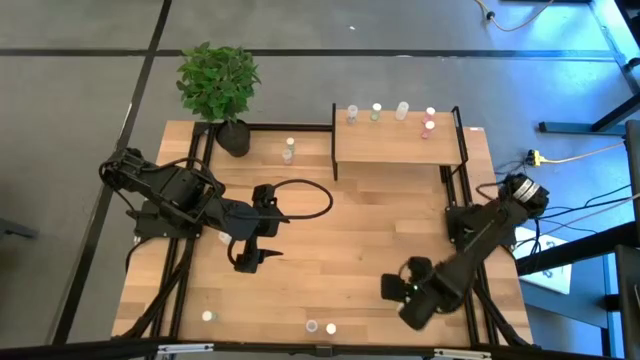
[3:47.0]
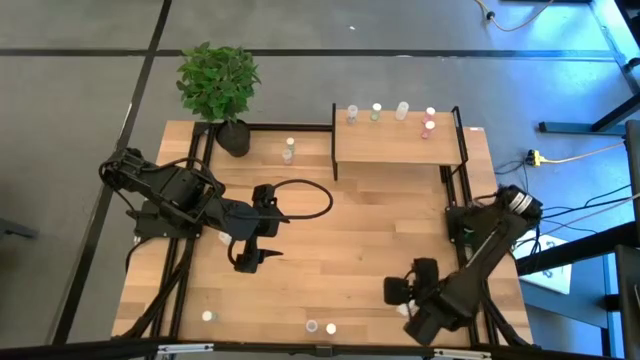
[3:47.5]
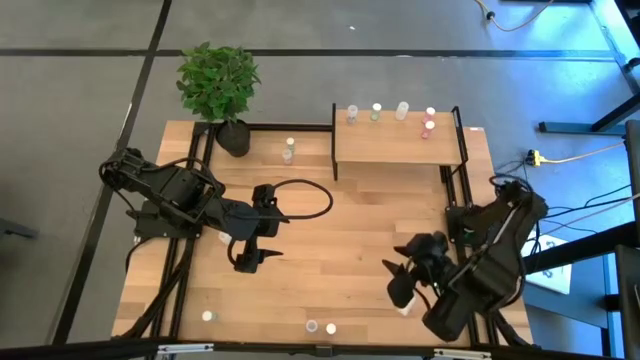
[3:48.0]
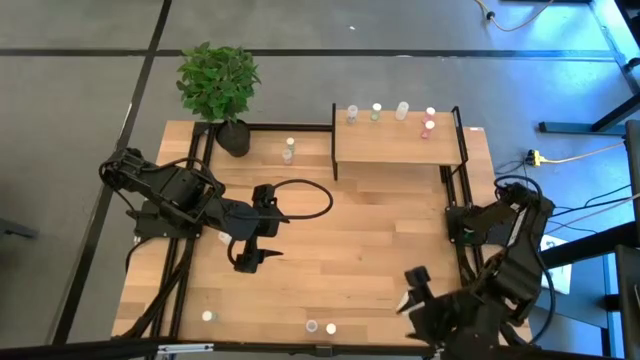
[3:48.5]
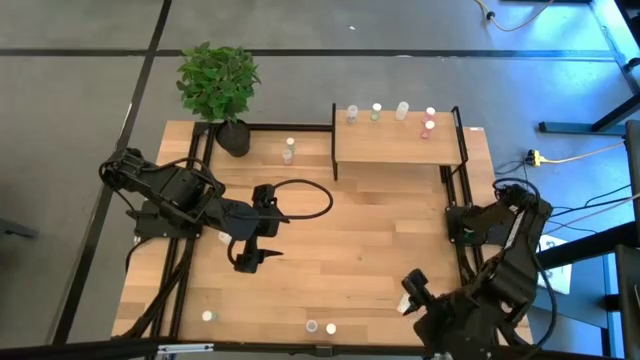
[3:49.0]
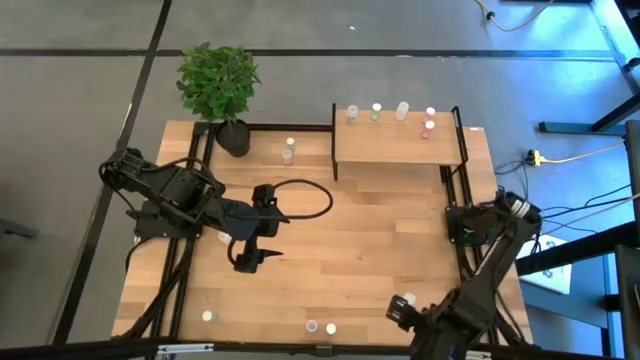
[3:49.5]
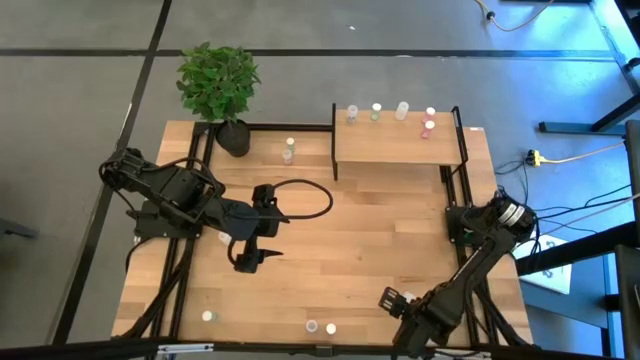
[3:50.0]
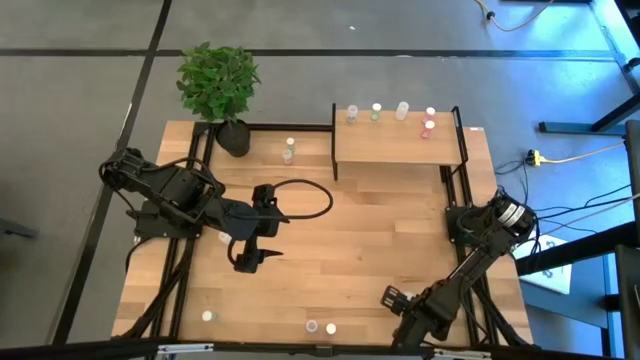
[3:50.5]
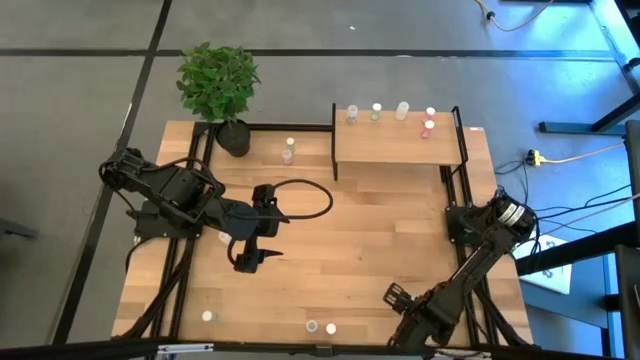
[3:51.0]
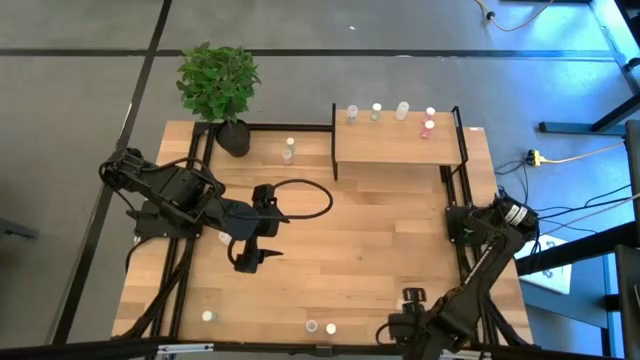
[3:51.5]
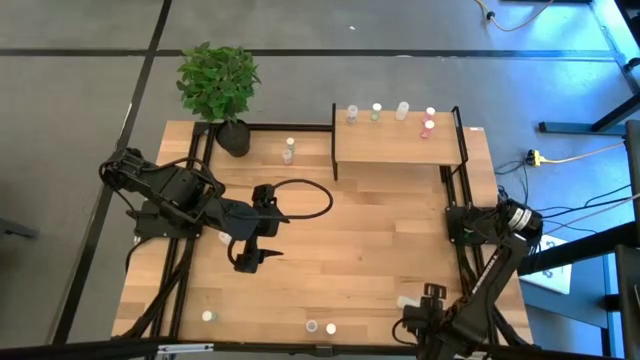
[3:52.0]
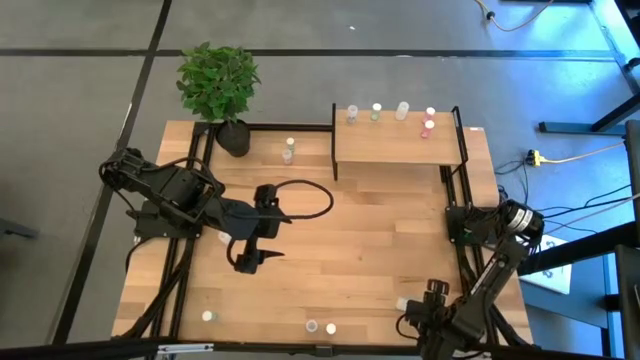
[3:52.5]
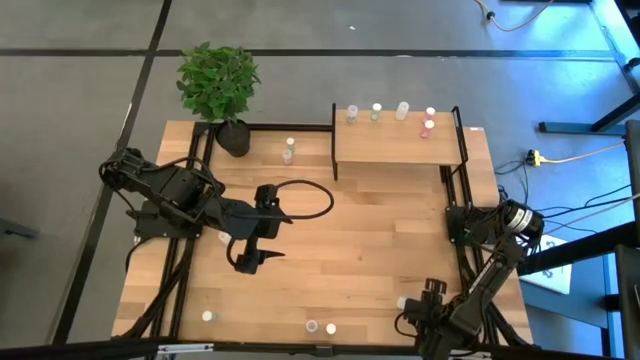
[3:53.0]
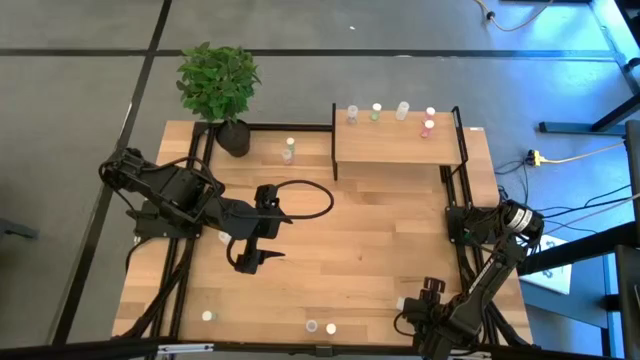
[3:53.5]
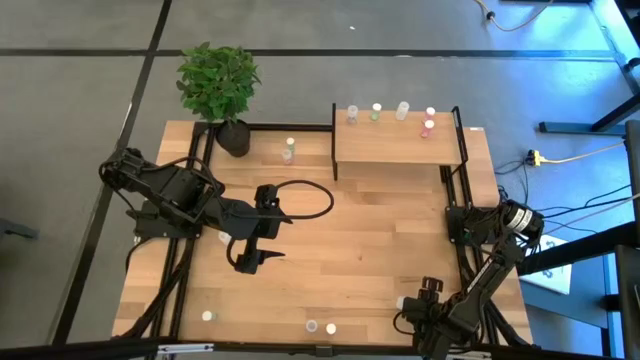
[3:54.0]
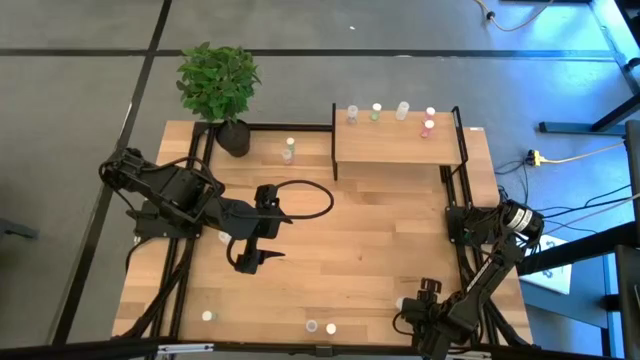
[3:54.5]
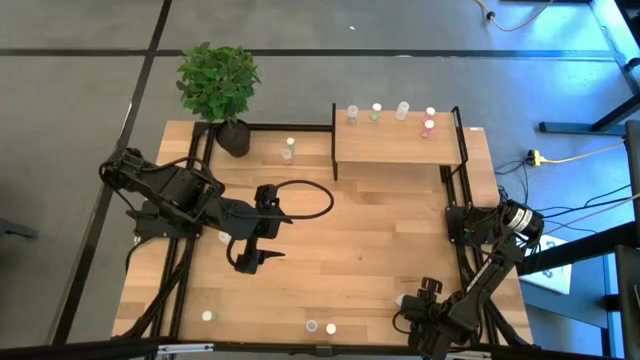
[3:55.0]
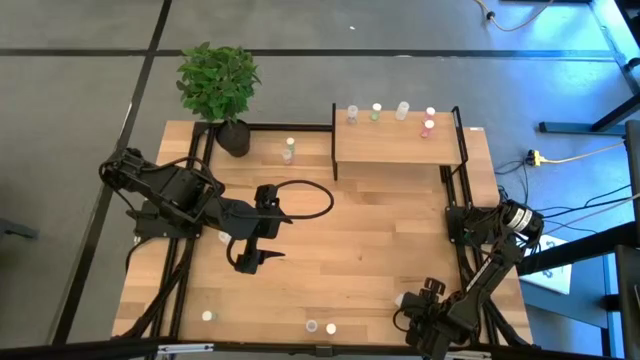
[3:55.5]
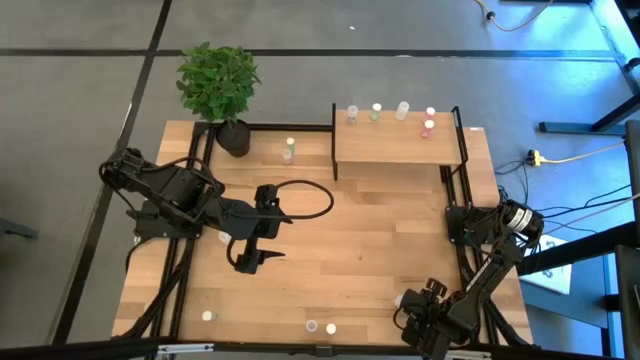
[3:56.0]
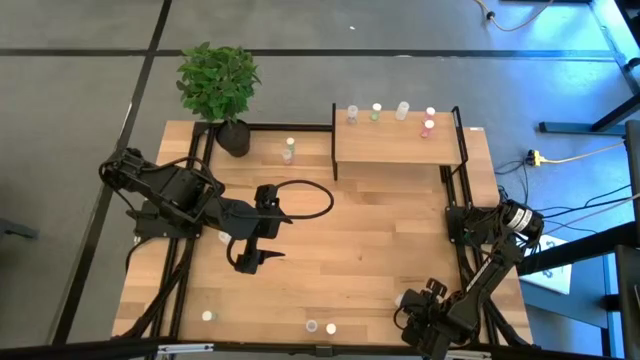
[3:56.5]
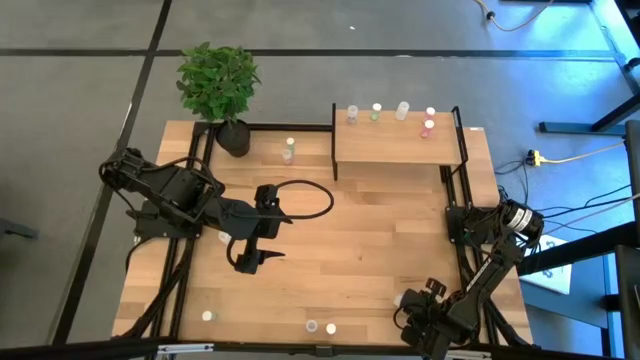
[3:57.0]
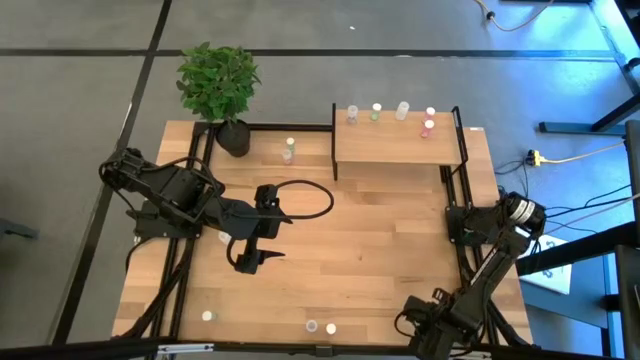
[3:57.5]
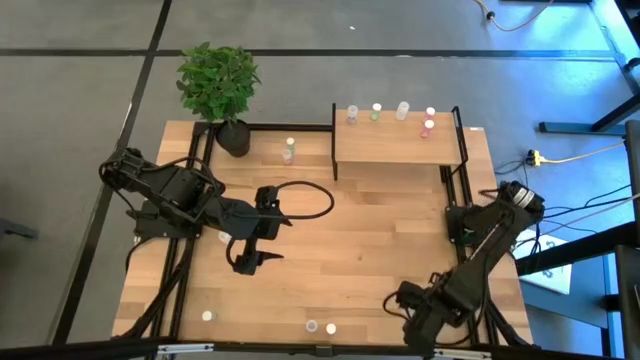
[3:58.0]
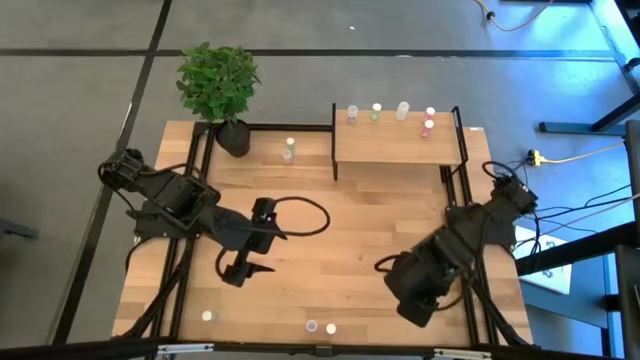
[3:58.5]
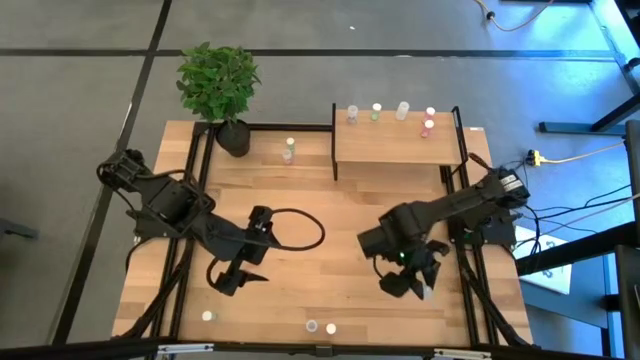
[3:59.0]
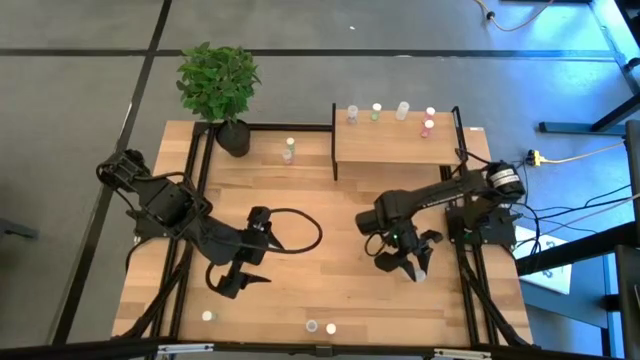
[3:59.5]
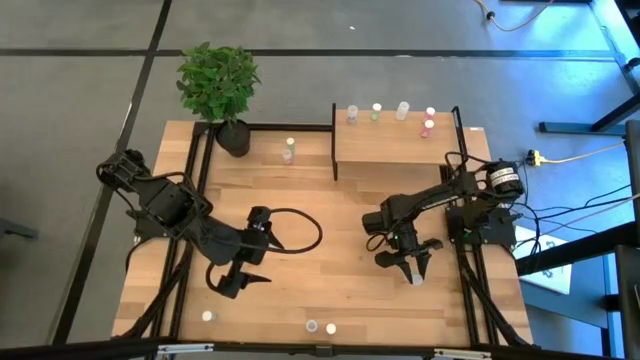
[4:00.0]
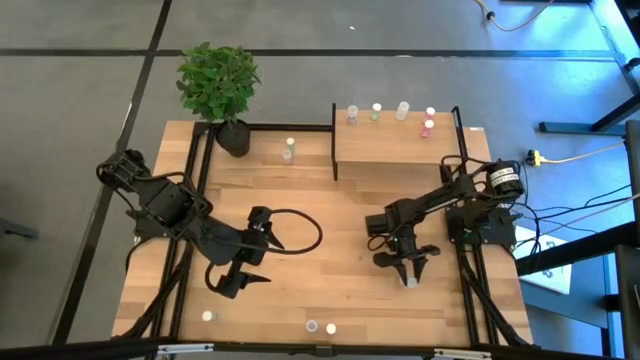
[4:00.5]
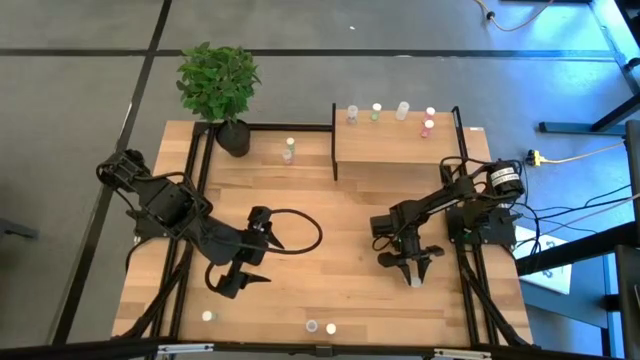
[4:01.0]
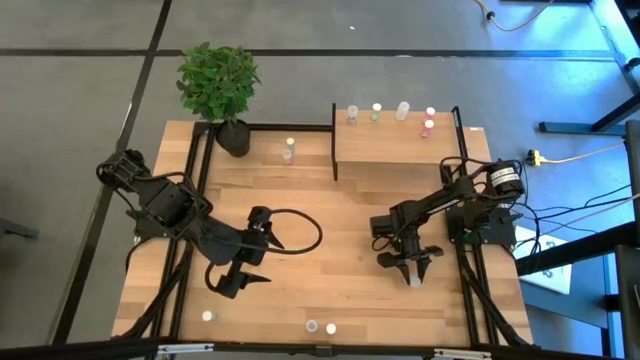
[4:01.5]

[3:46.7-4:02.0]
Task: Pick and place medicine bottles onto shelf by color
Put the bottom white pill bottle aligned with the other white pill bottle on the shelf
